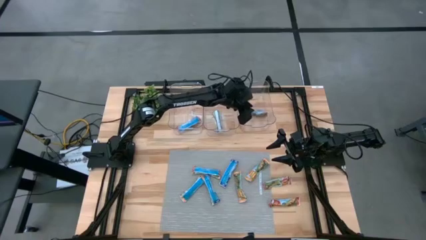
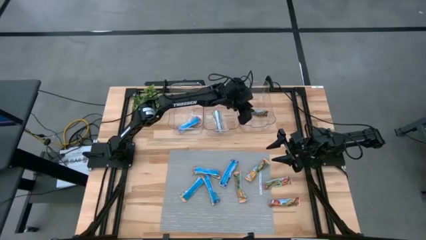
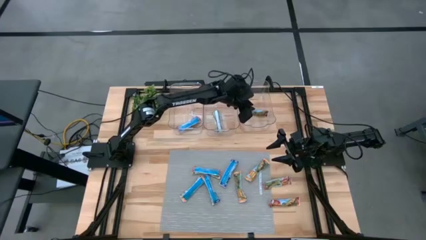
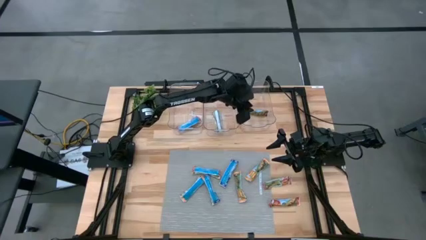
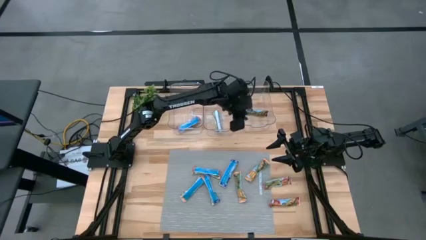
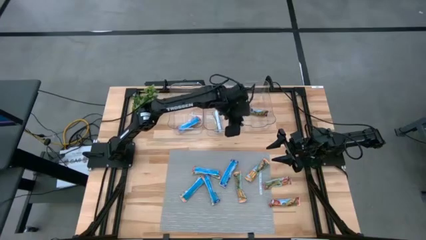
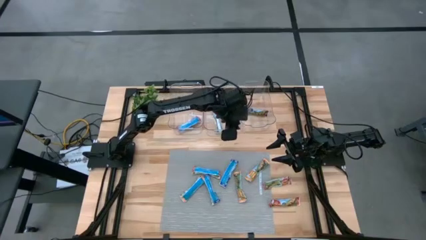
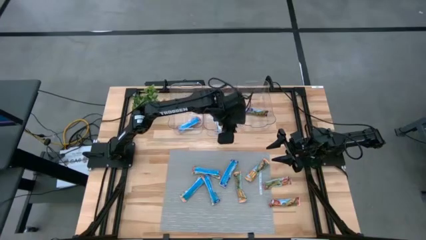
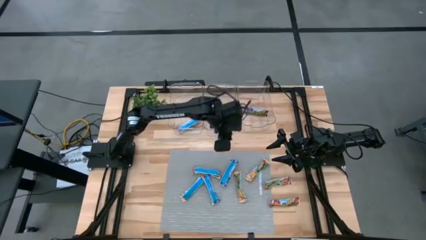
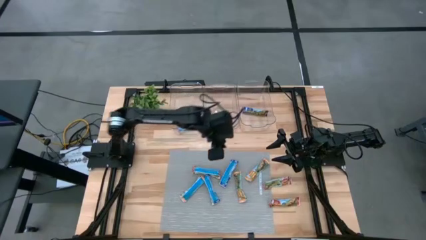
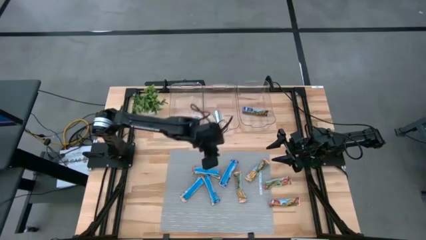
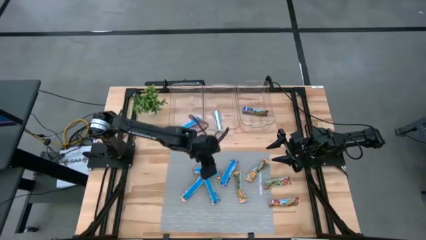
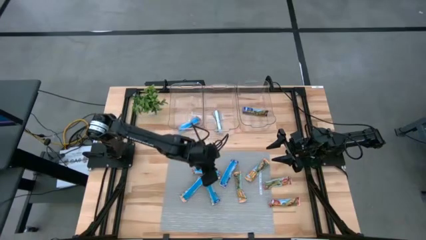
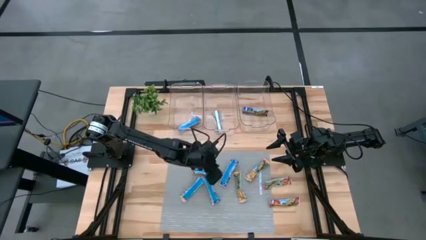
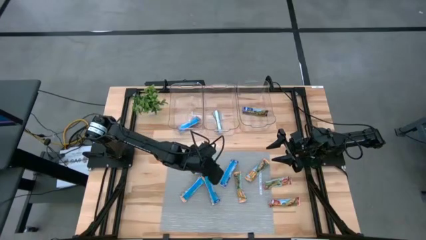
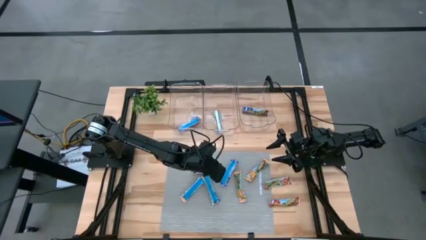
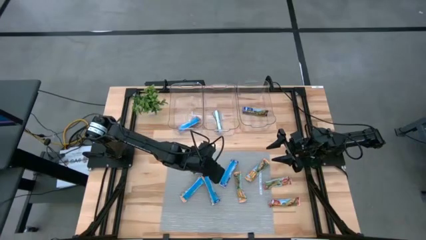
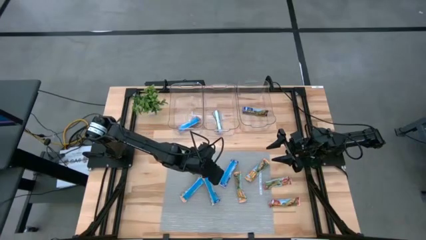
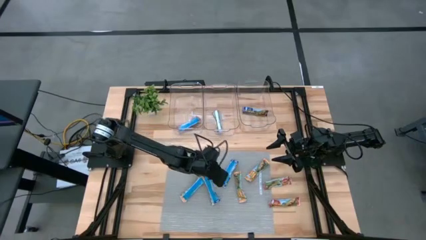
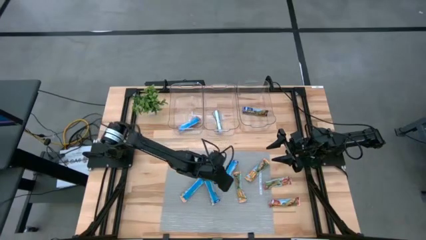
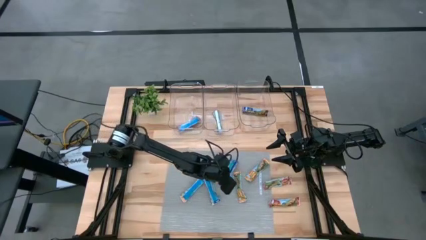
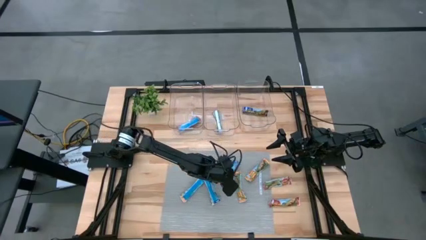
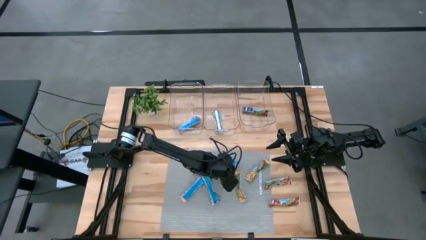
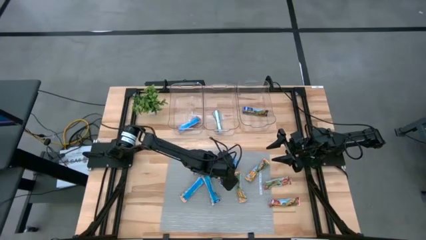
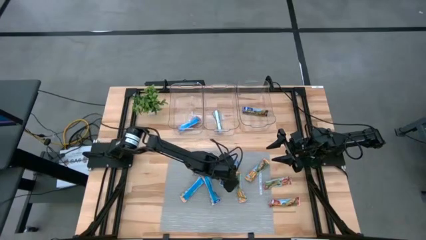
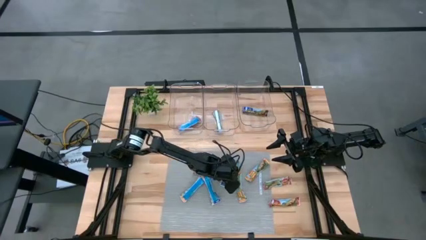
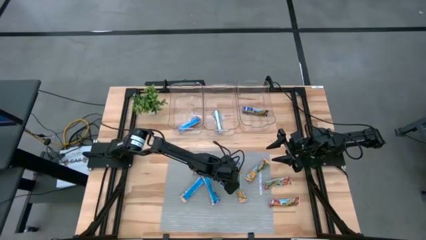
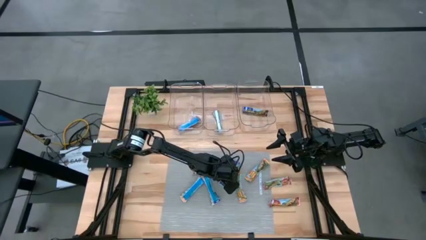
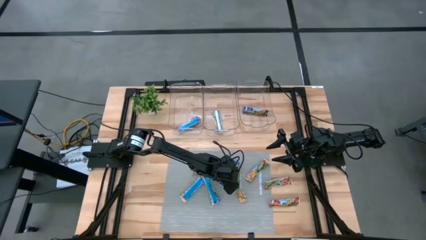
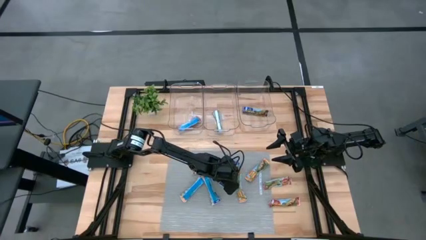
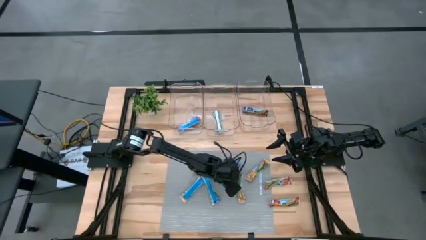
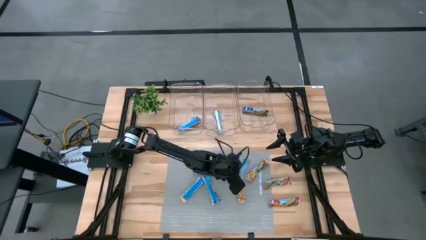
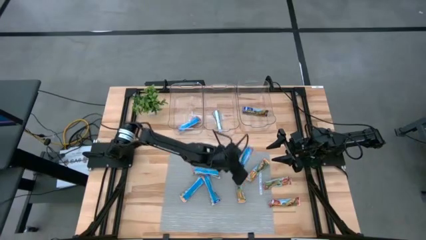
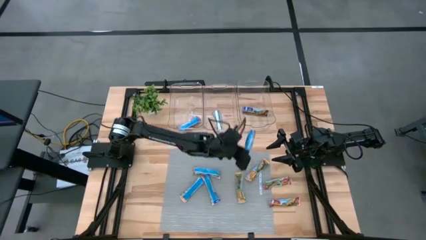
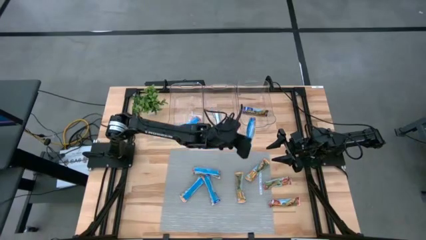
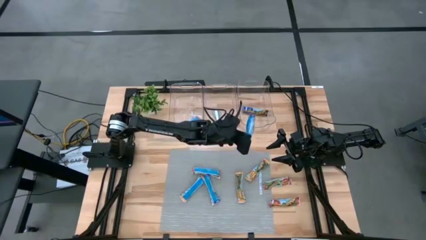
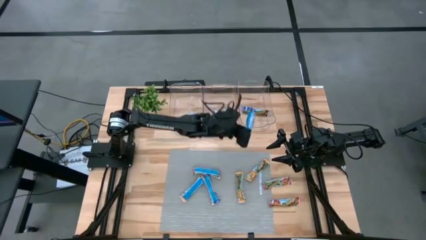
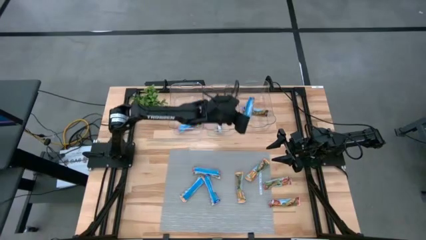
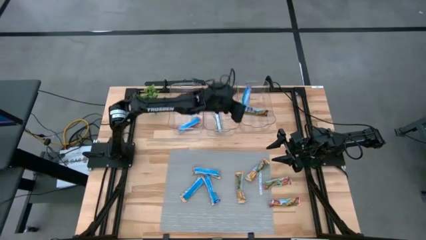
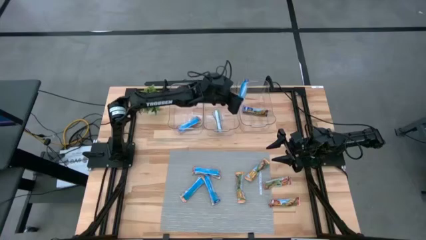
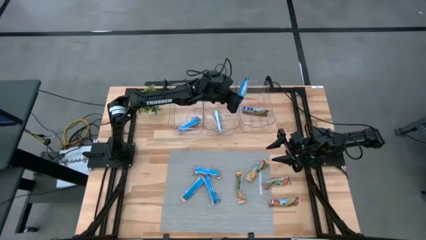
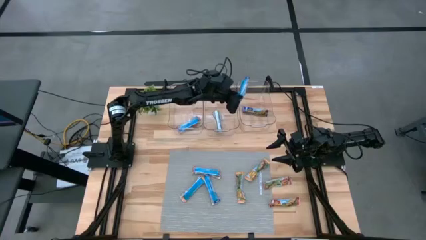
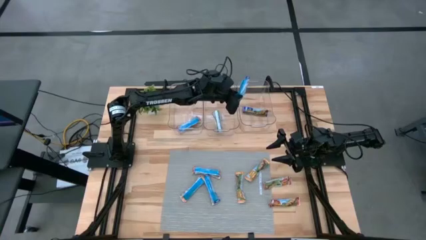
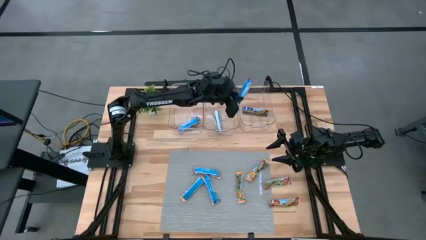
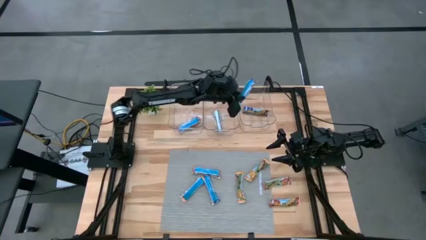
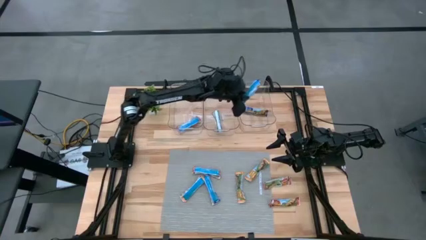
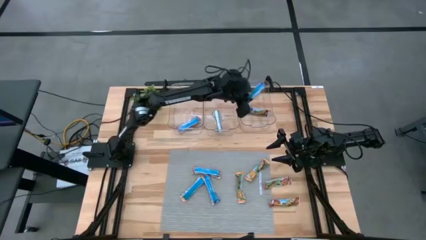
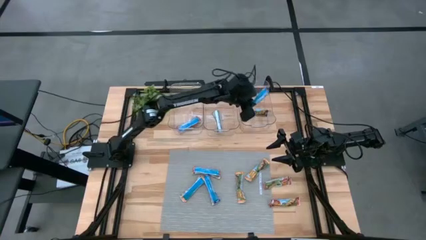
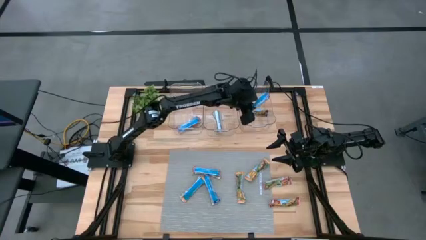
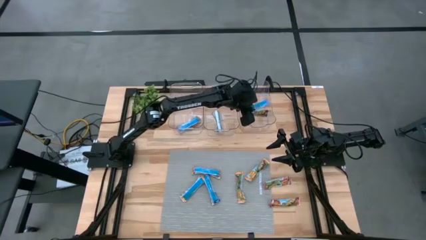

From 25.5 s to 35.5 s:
Task: Pick and place Granola Bars by type
Put the blue granola bar into the right transparent bin

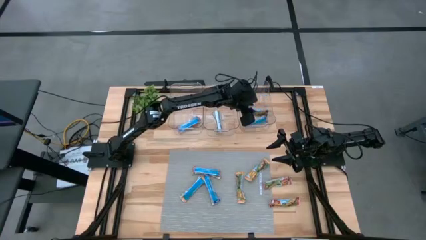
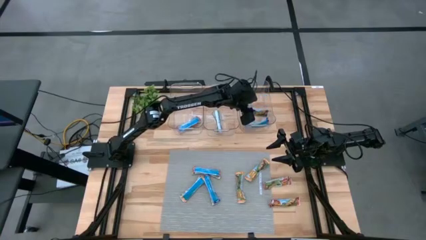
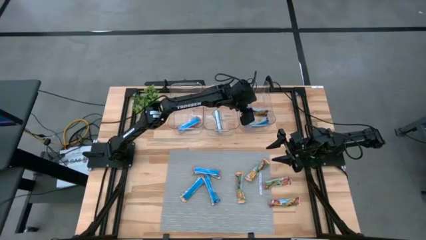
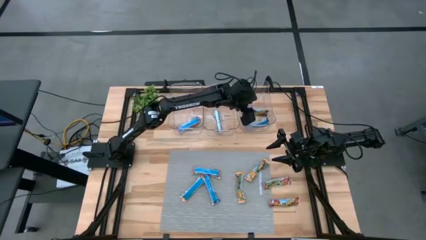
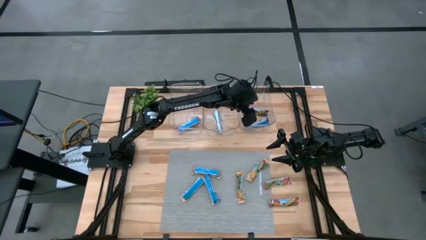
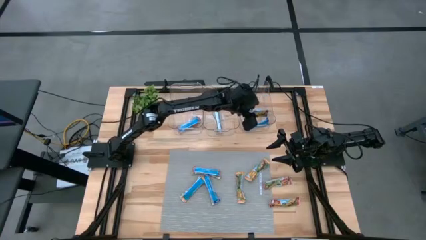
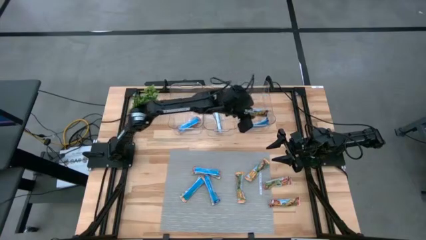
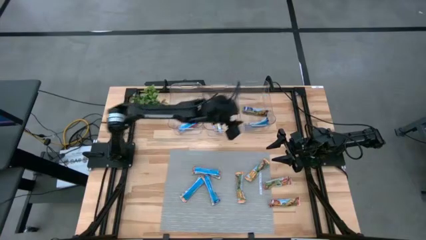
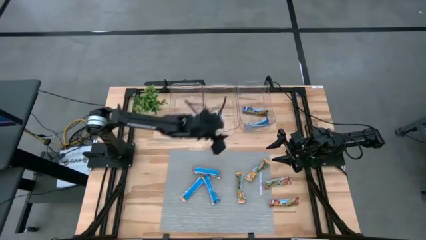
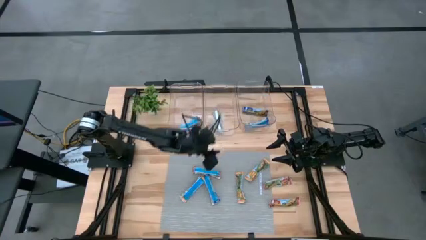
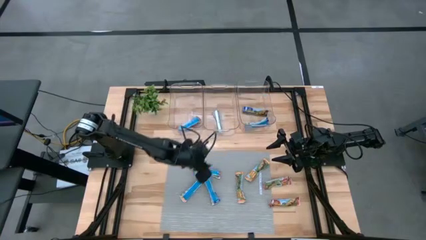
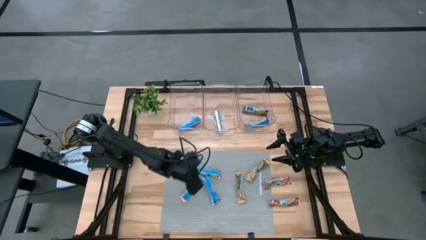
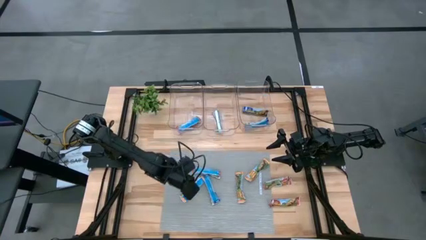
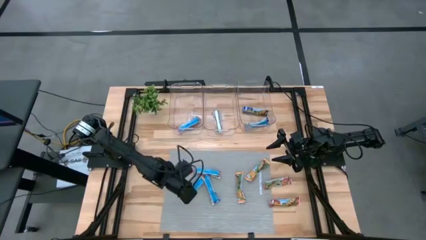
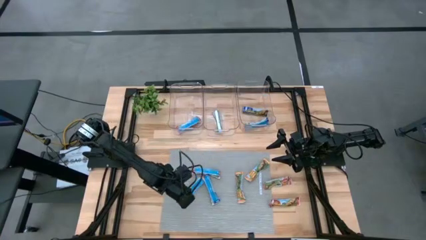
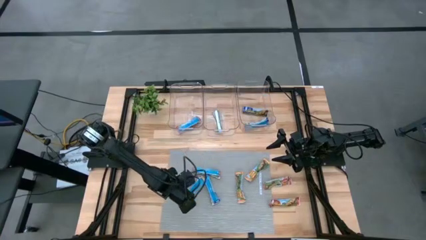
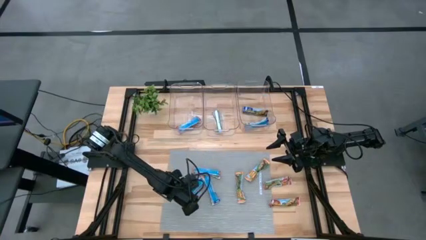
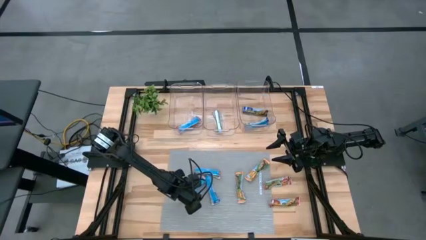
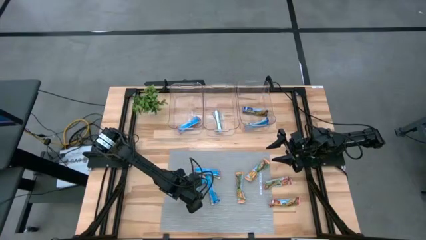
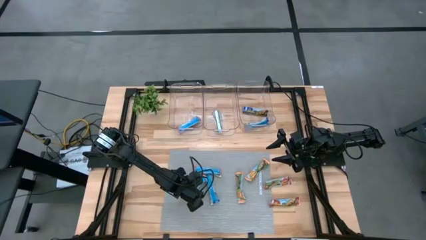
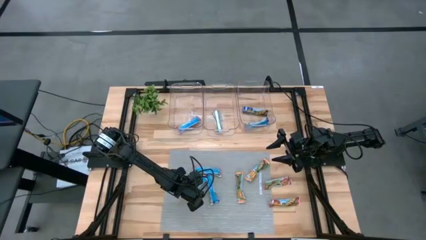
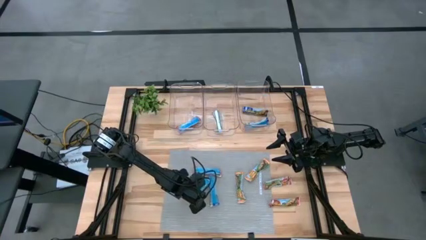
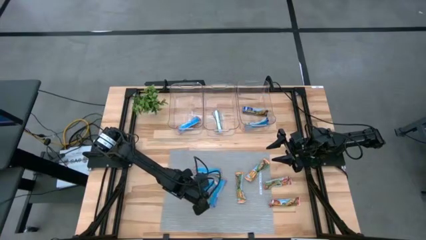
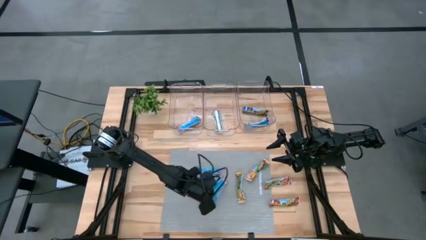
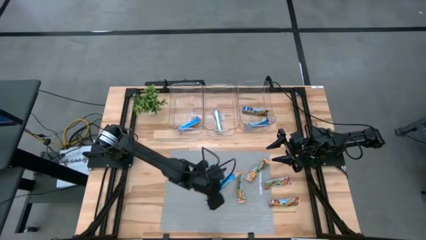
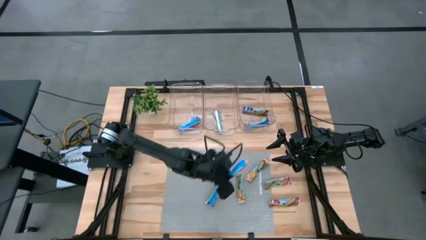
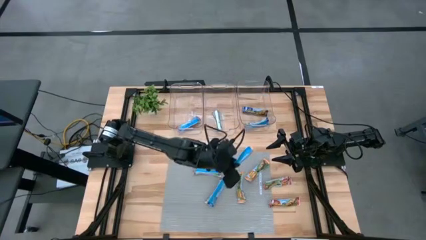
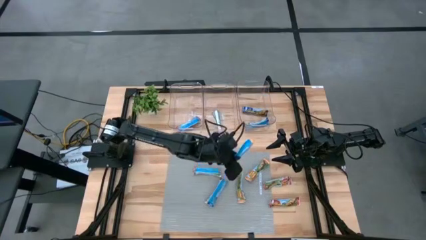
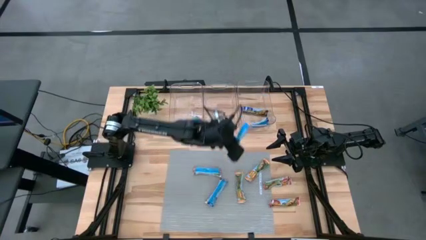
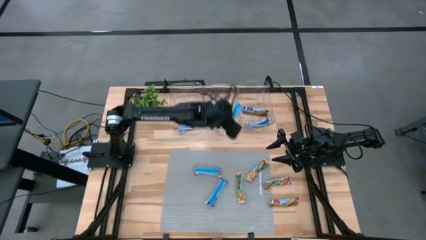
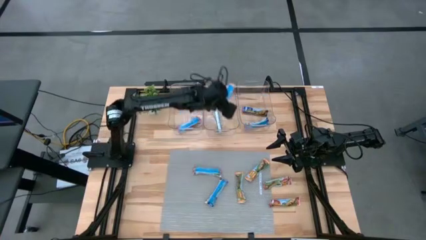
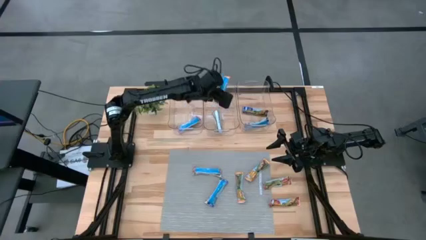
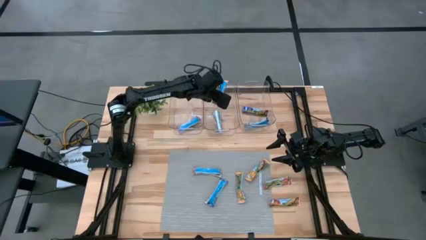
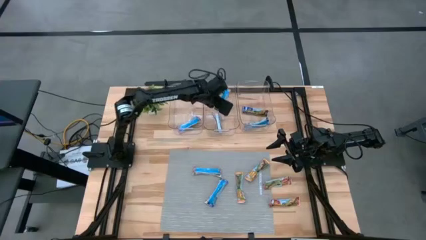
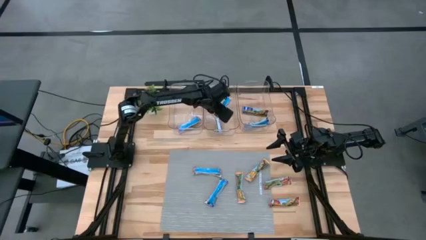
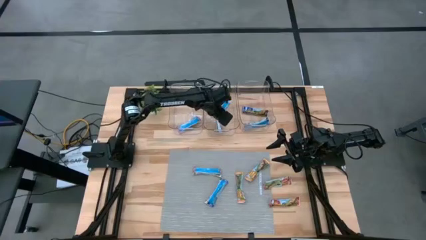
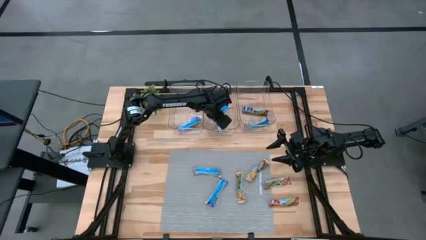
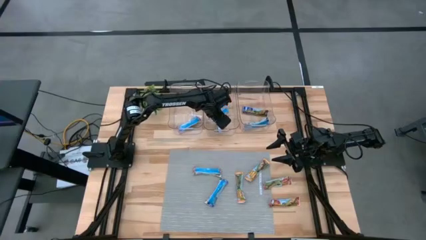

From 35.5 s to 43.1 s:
Put the orange granola bar into the middle transparent bin
